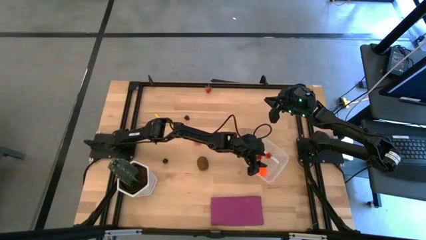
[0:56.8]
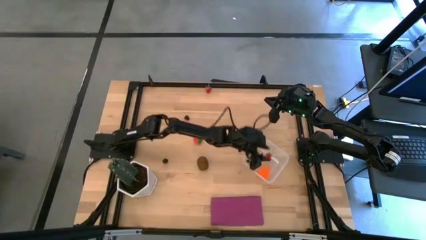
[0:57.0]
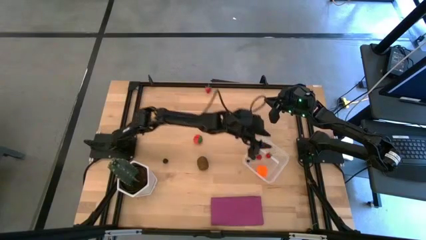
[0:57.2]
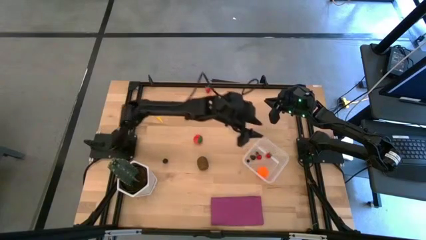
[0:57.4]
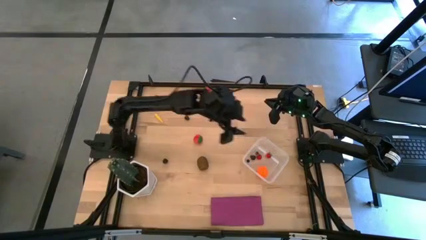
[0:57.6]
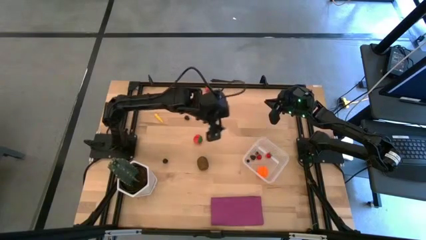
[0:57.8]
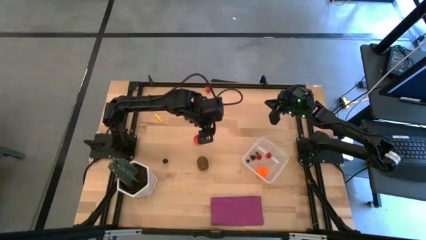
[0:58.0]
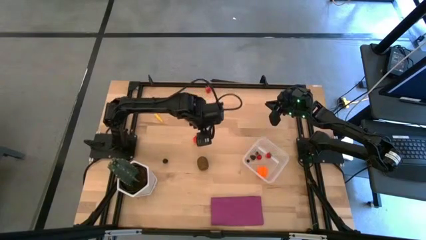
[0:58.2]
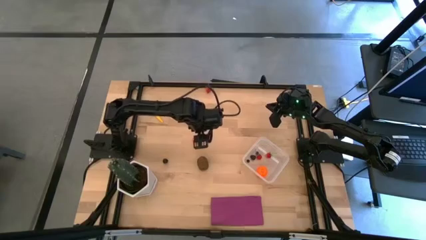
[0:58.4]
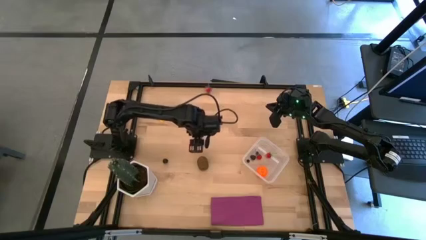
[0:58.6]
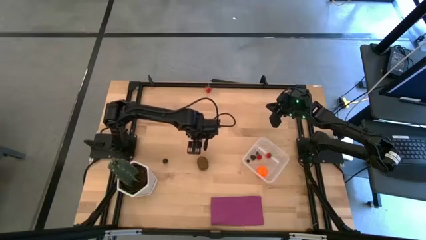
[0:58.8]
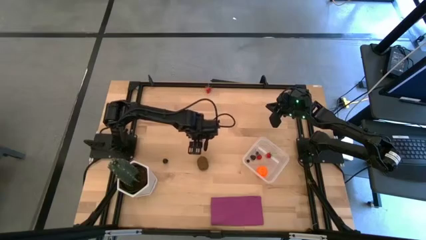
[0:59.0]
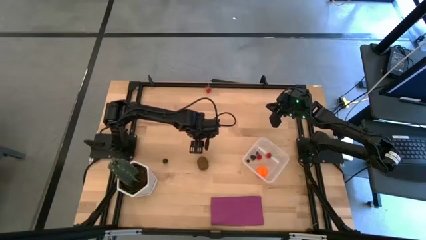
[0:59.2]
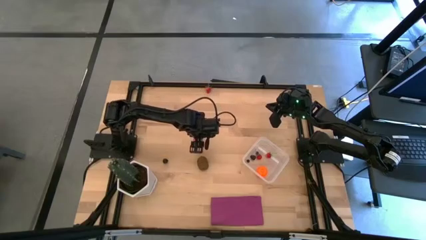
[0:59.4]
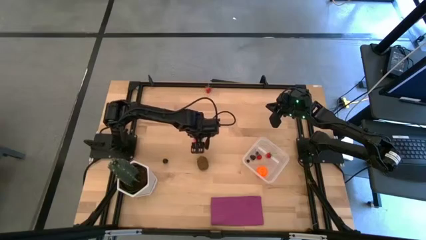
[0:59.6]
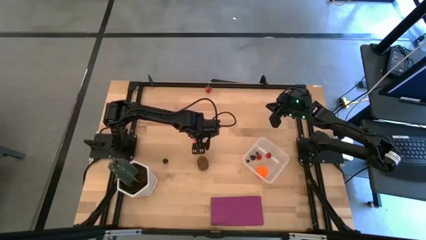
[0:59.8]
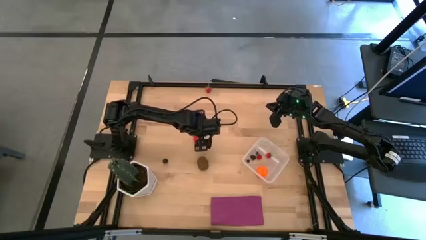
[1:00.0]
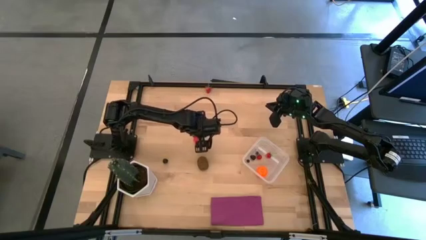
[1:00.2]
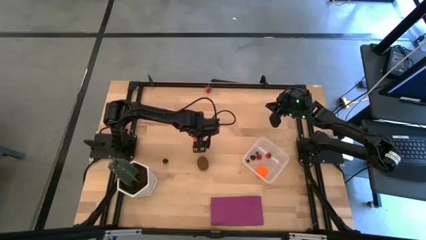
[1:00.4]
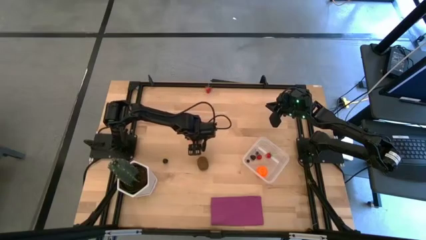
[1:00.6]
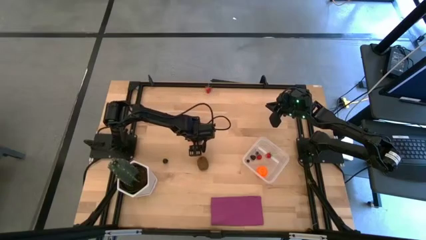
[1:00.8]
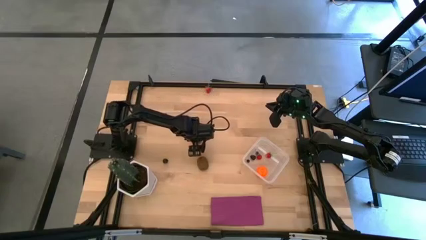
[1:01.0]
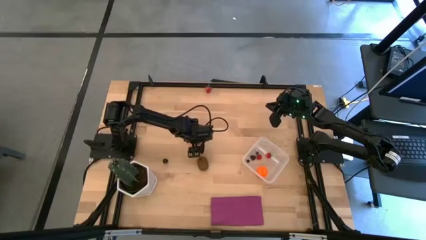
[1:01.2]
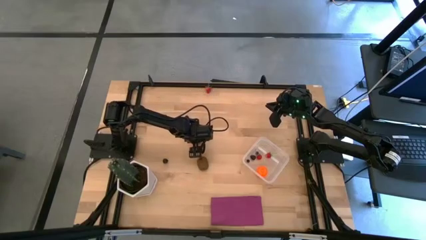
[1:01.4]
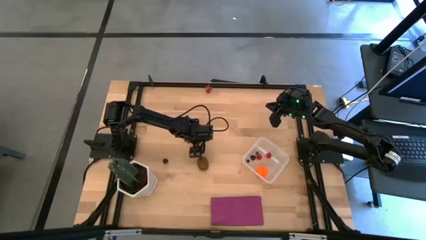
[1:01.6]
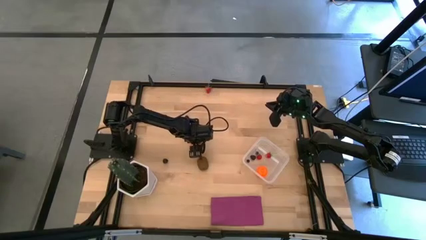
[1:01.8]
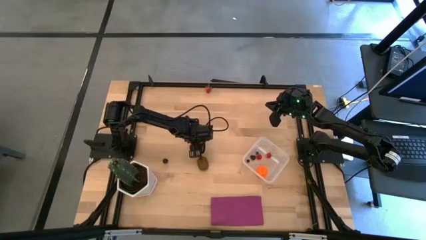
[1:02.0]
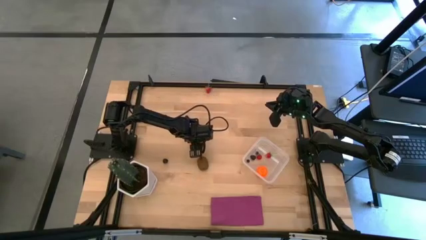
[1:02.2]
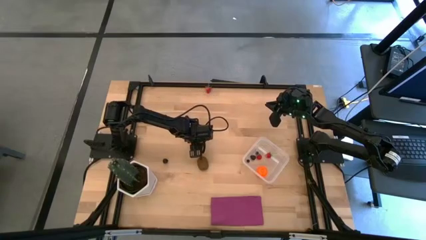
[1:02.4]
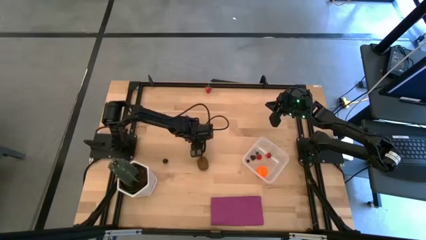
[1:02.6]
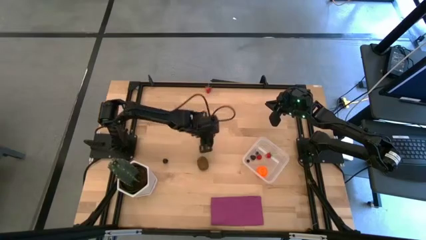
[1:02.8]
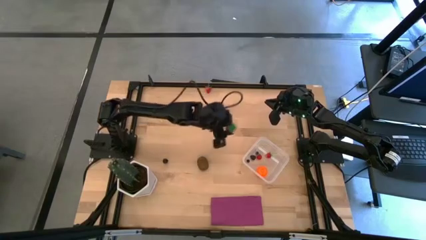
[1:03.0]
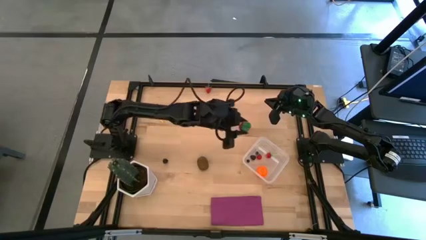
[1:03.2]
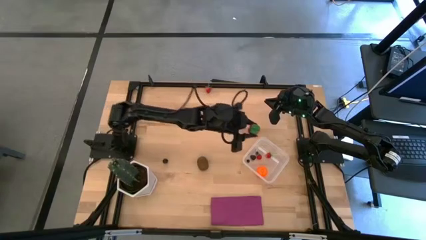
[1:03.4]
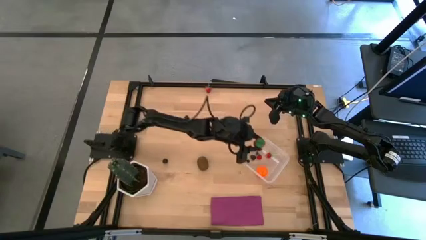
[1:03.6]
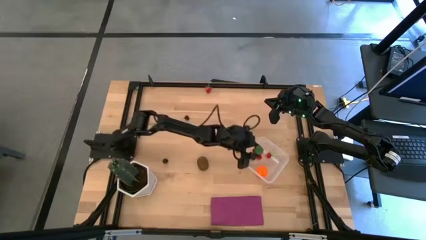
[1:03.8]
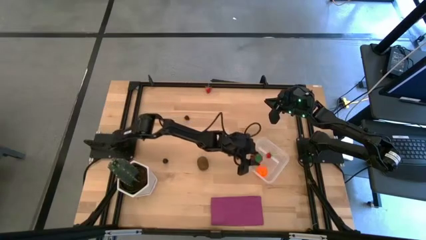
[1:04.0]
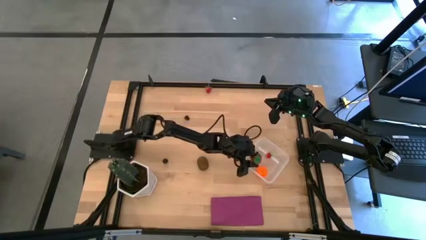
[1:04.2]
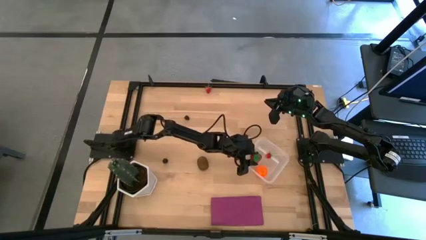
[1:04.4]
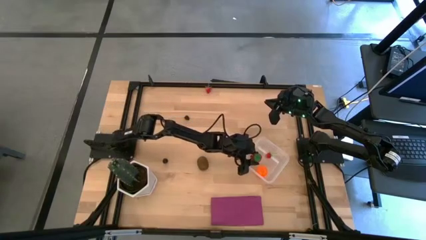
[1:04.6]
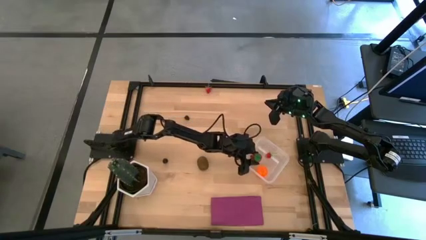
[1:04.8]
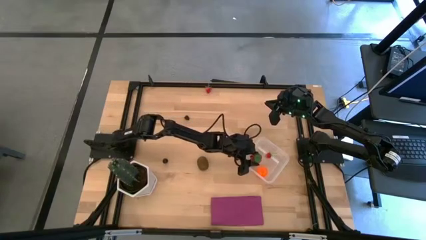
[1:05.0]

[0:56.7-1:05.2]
Task: Pick and placing Produce into tupperware
Put the strawberry into the transparent bin

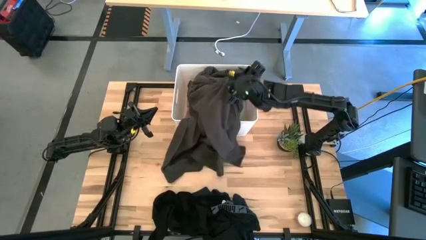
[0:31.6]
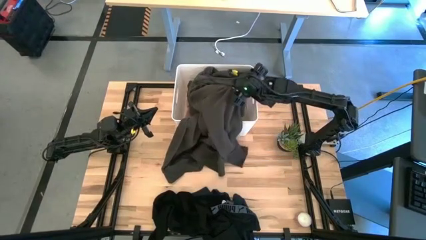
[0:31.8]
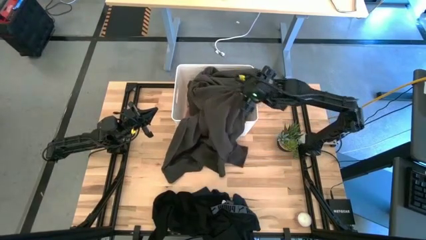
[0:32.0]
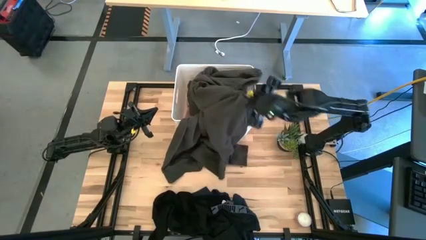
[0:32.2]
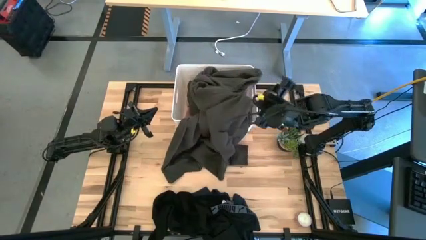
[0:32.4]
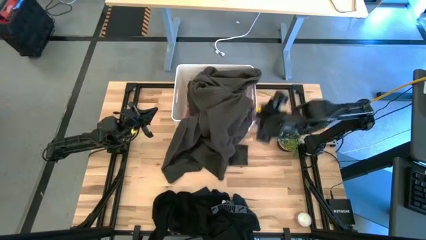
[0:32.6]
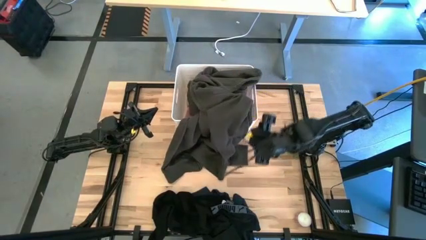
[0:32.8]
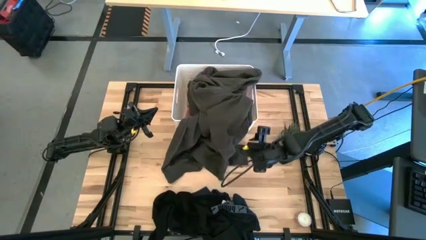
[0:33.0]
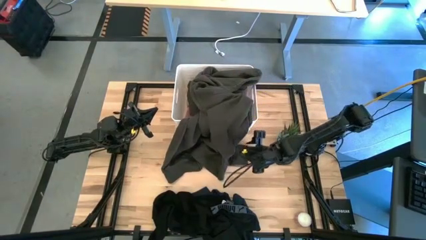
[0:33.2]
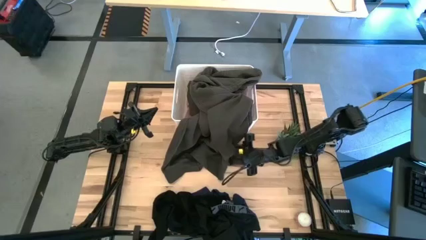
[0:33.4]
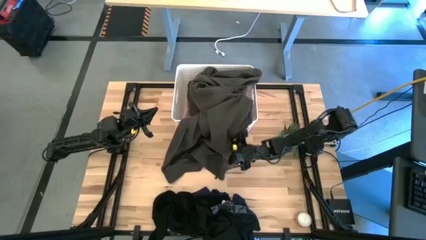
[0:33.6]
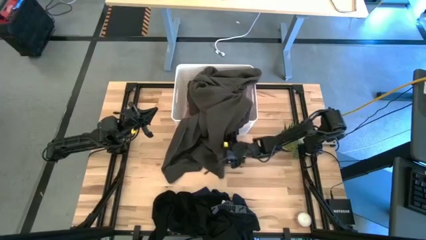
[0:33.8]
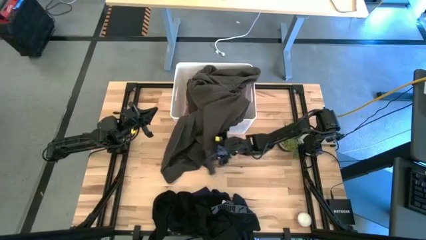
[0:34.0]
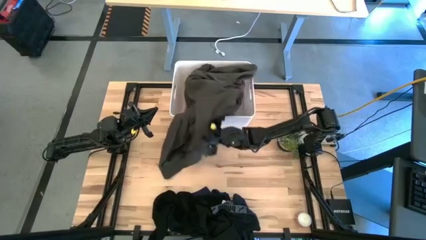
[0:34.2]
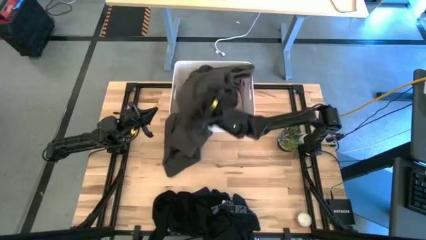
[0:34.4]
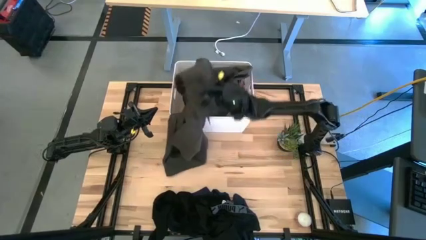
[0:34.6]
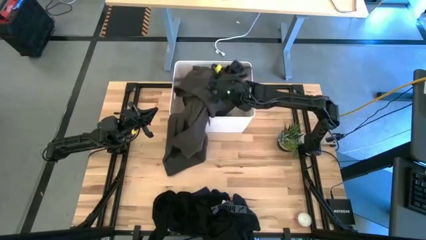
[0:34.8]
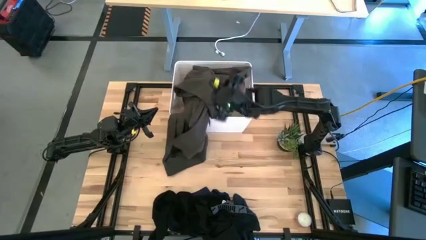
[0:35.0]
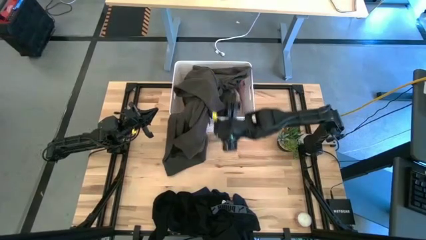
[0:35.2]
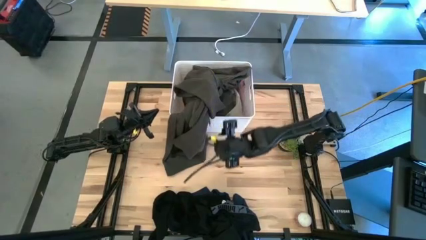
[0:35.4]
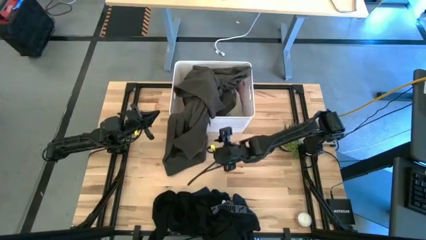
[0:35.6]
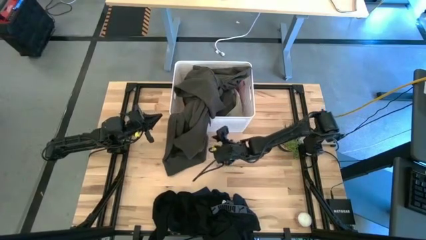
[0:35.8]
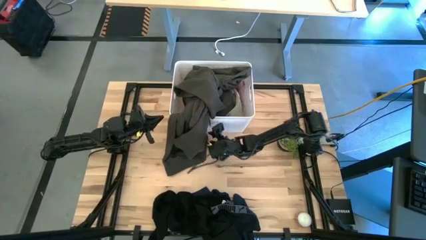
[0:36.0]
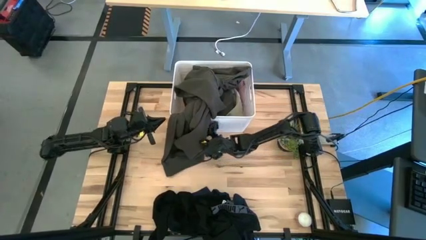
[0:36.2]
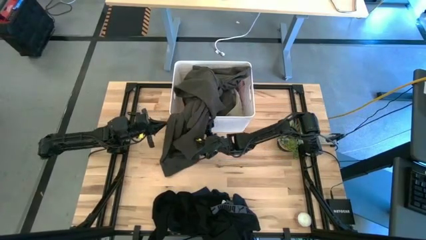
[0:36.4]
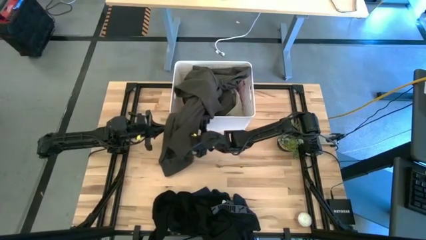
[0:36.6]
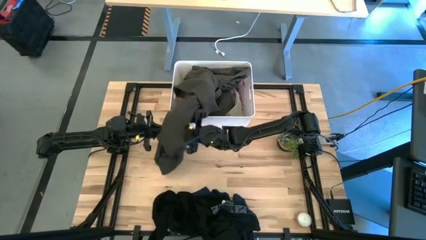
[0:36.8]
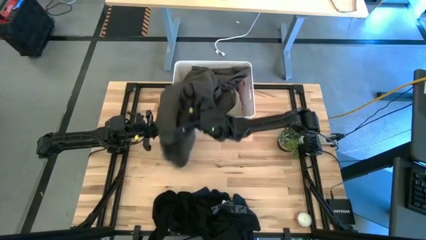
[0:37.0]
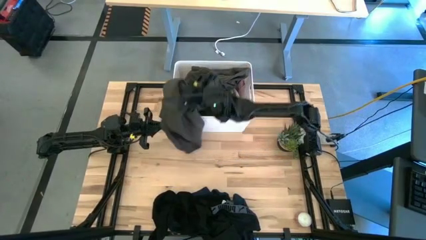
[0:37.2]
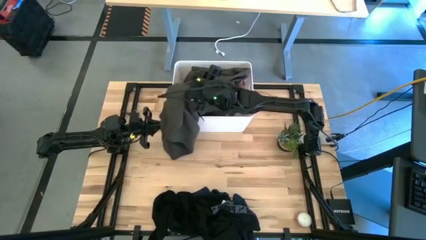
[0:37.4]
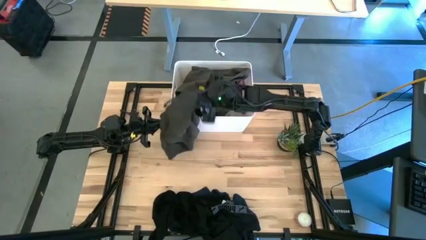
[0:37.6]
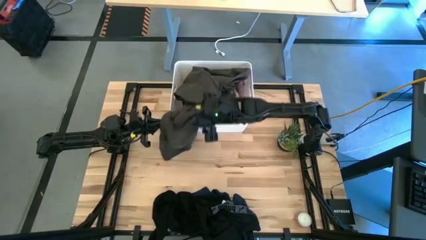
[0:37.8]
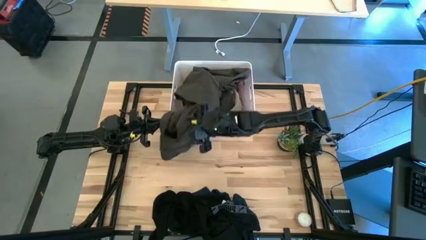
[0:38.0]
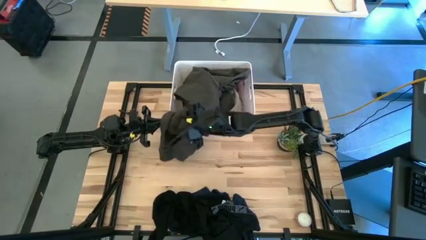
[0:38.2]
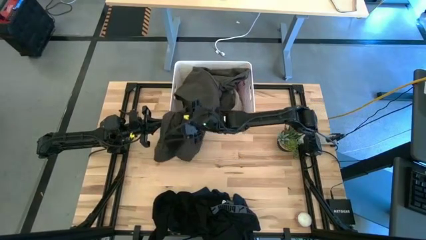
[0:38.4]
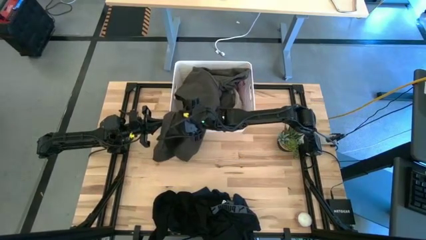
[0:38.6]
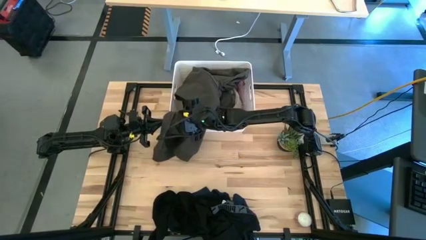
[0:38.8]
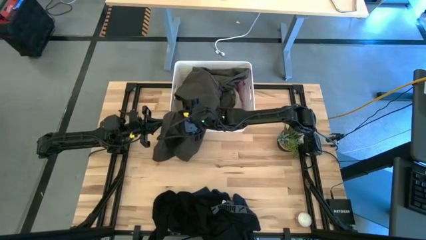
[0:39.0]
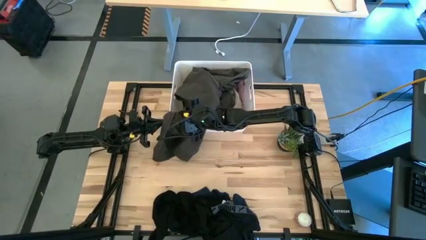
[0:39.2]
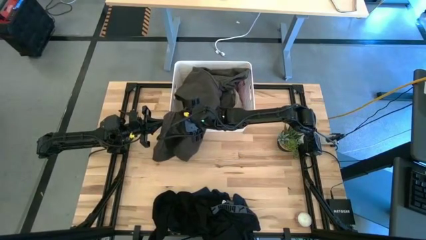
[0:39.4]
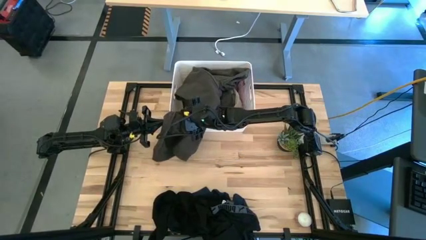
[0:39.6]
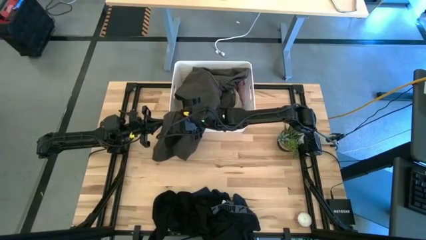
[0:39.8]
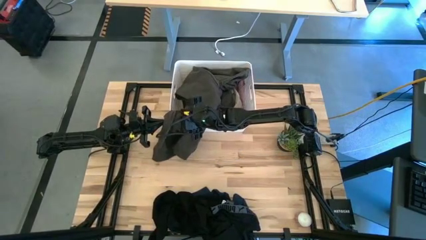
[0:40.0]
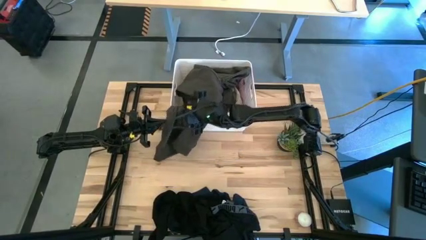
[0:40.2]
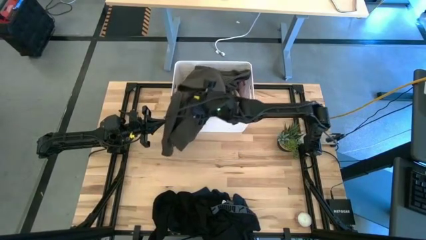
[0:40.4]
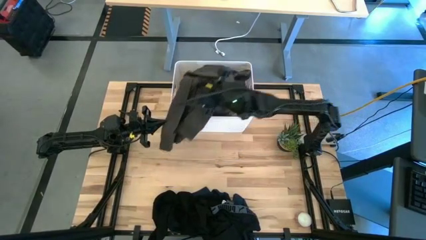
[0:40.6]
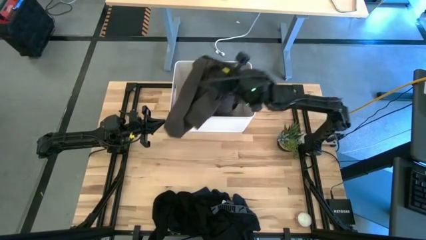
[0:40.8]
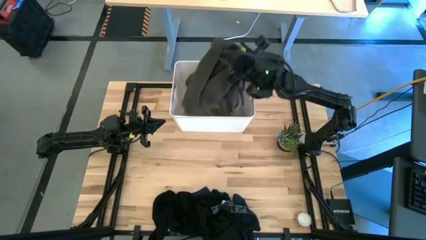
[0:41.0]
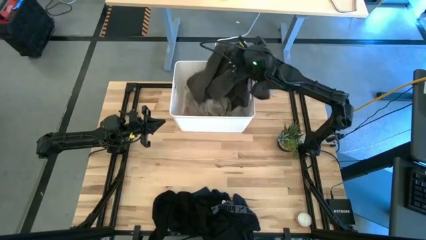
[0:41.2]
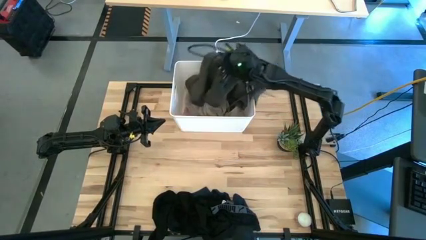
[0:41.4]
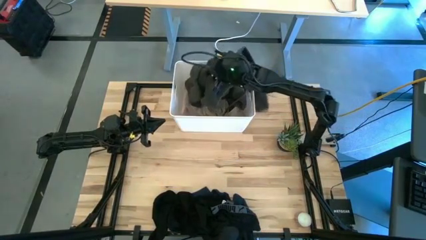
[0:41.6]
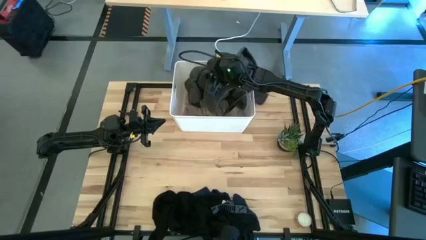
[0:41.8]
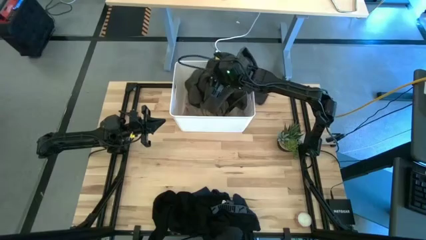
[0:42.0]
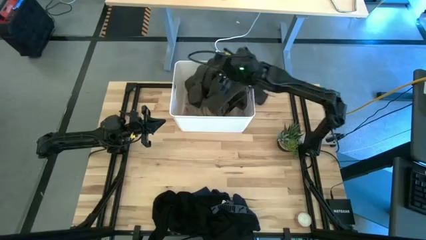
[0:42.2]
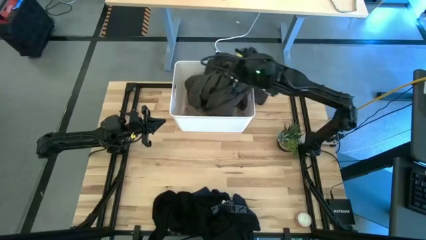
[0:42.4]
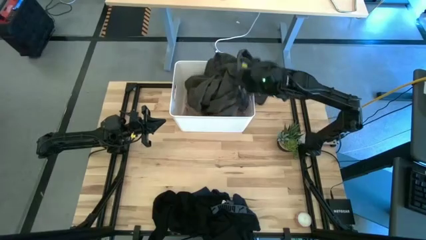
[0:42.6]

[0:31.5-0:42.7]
Task: Sort clothes
Put the dark gray shirt in the white container
